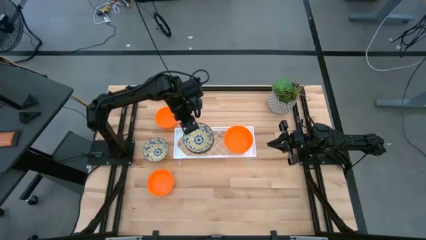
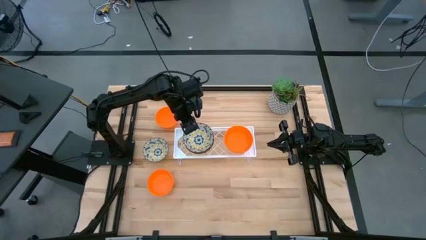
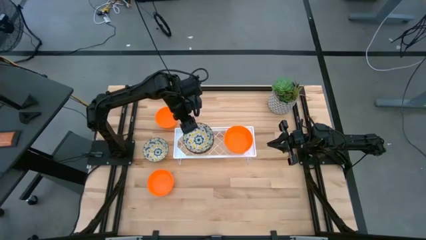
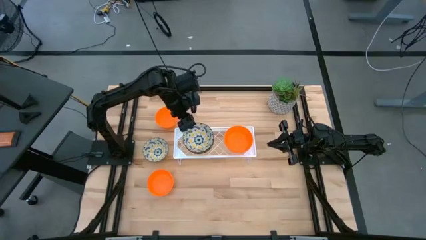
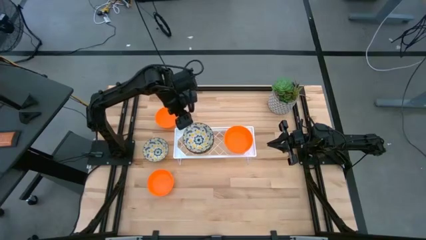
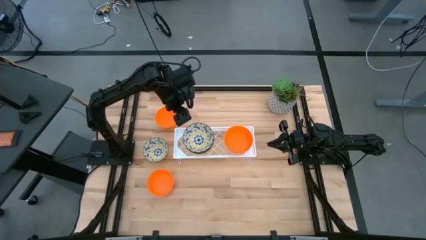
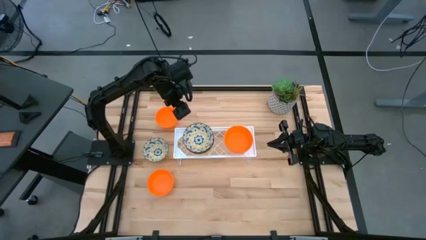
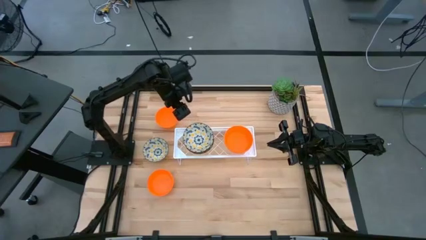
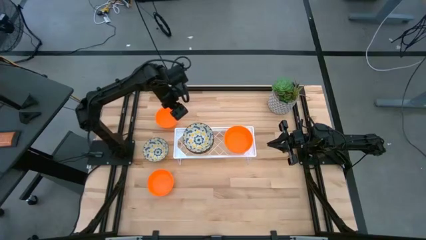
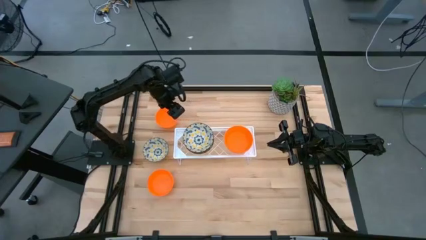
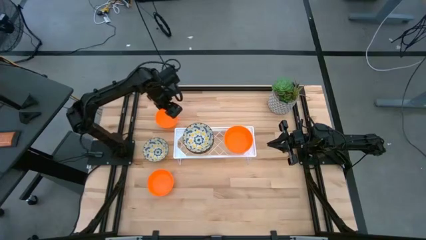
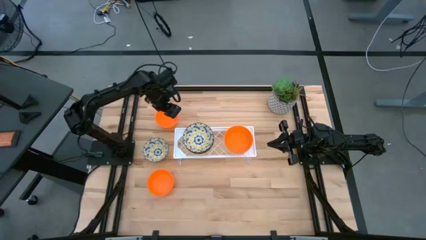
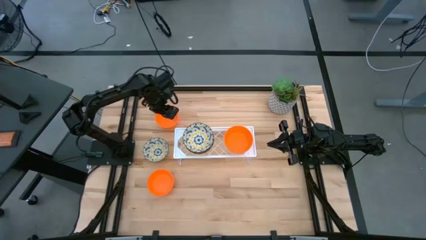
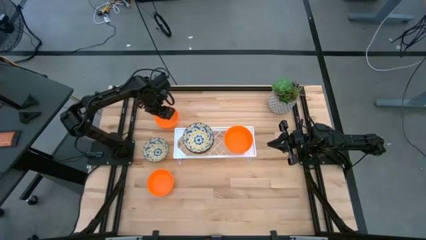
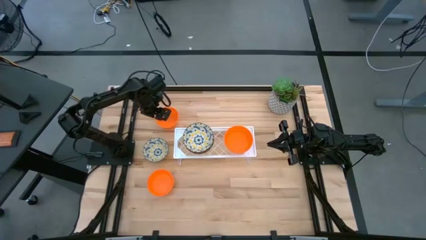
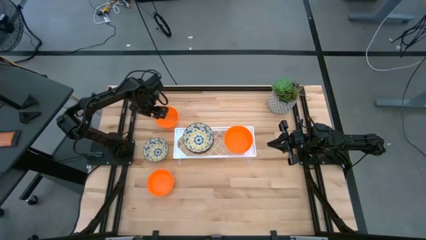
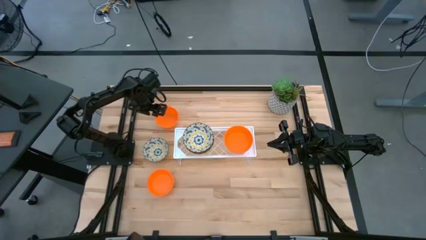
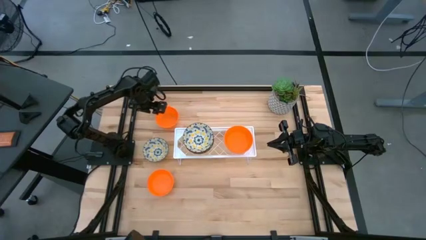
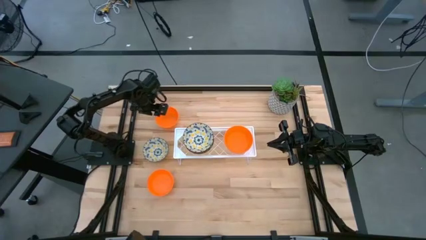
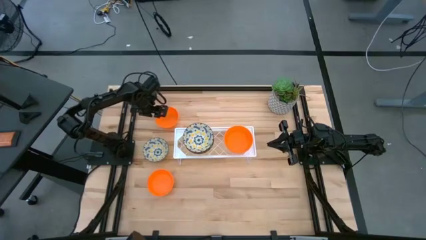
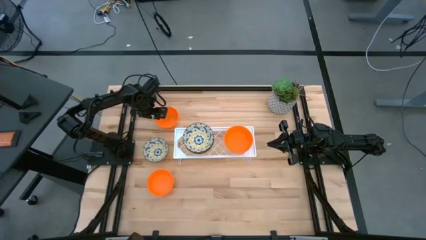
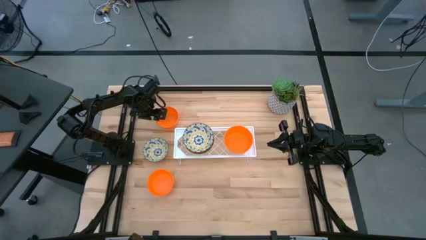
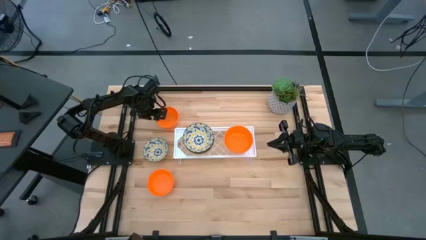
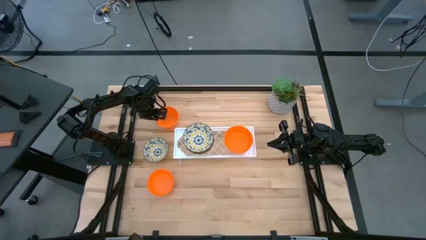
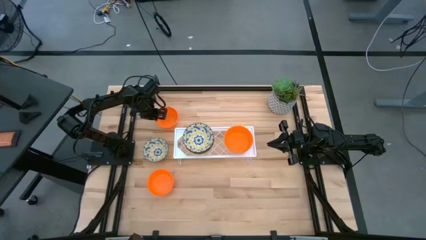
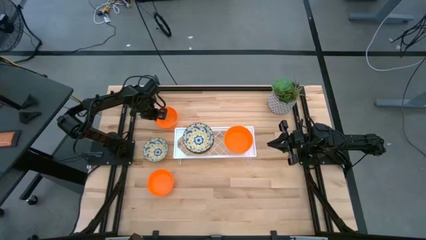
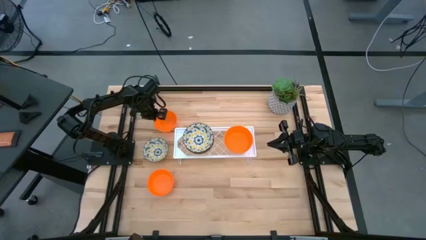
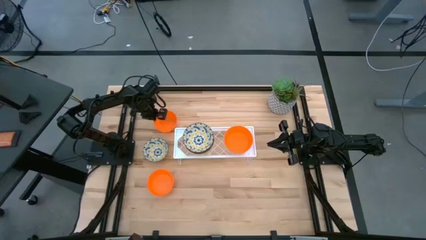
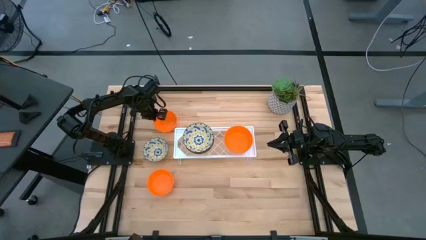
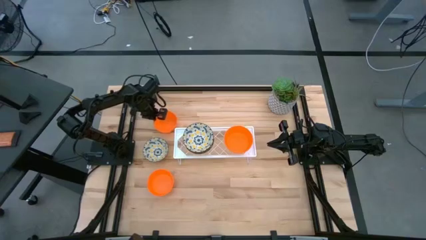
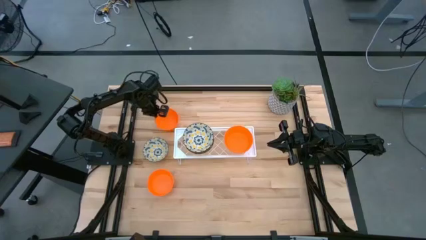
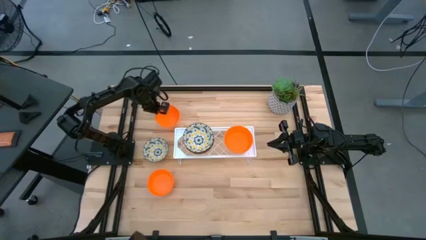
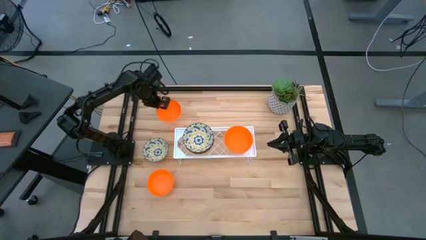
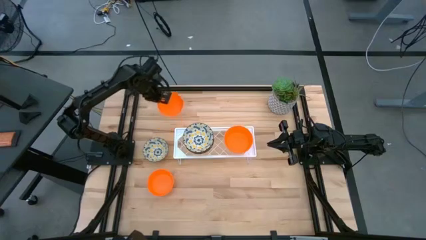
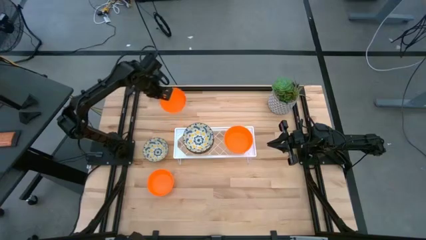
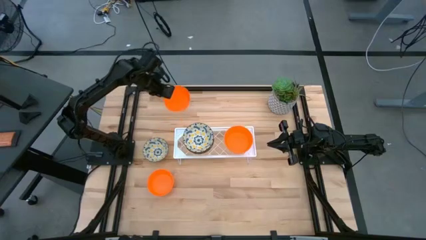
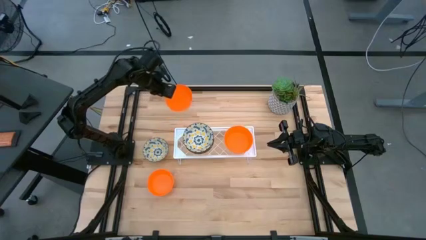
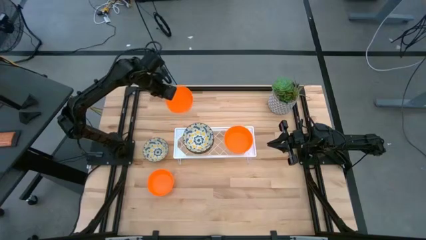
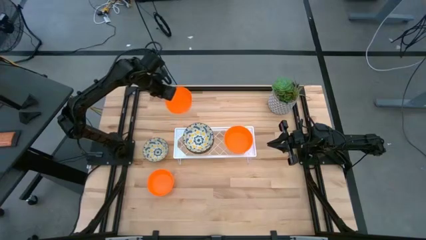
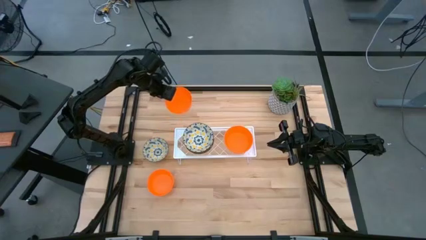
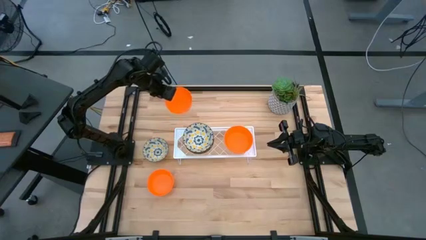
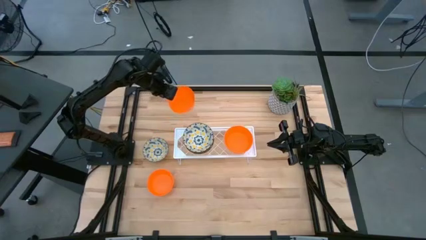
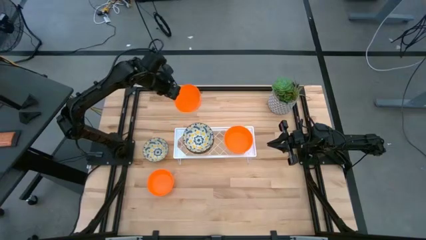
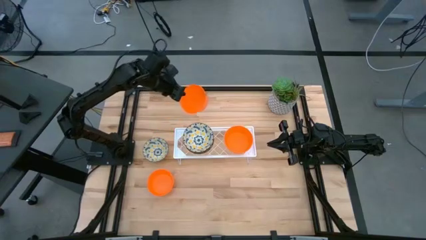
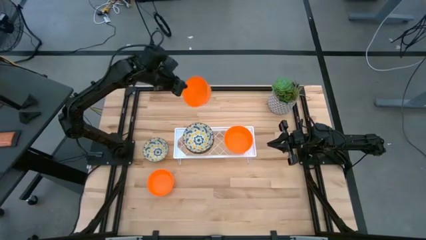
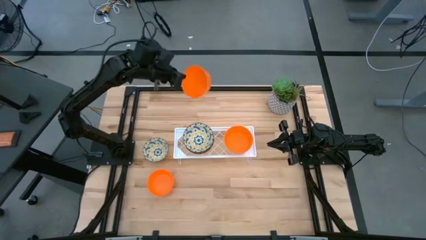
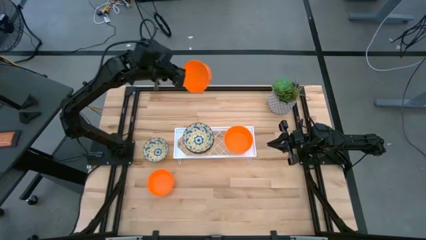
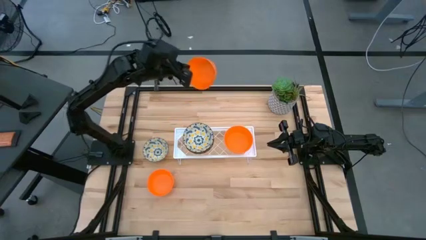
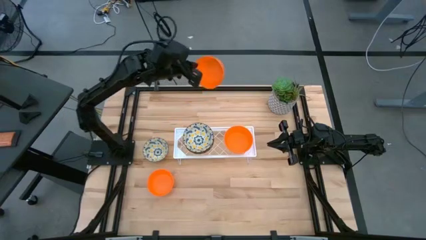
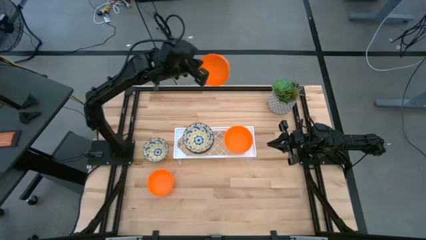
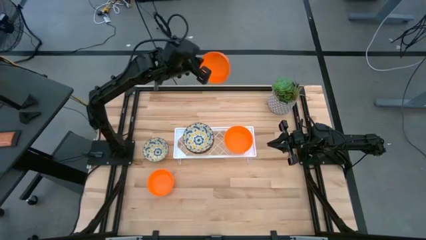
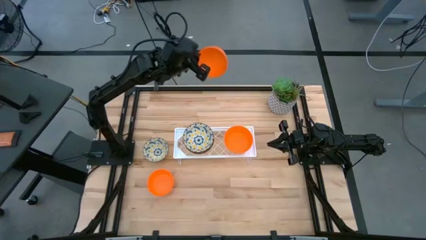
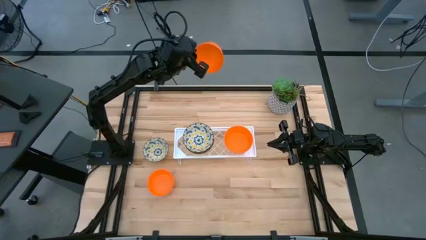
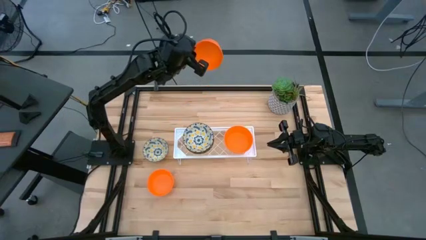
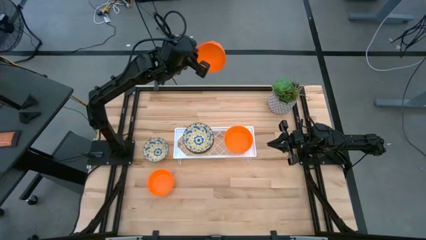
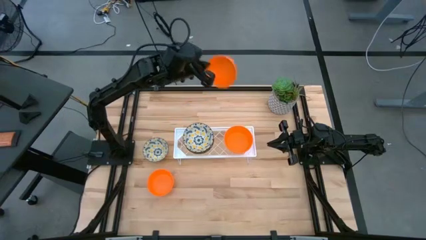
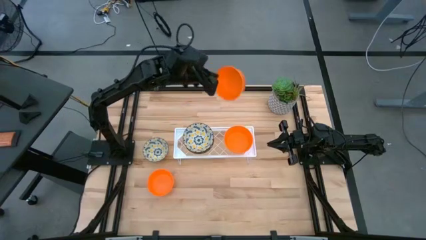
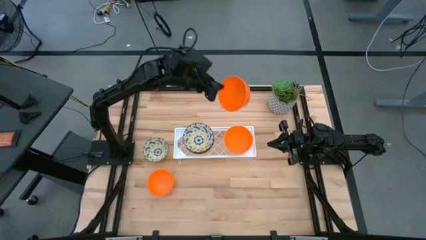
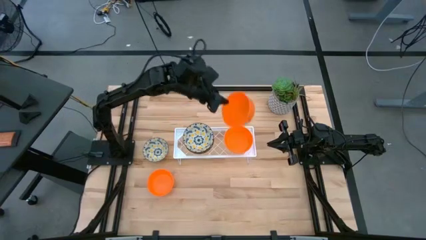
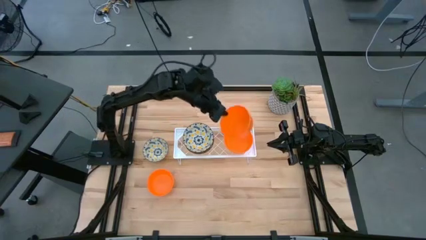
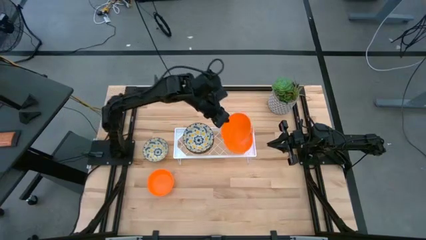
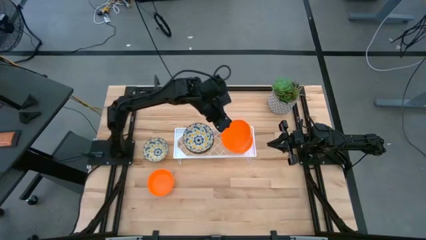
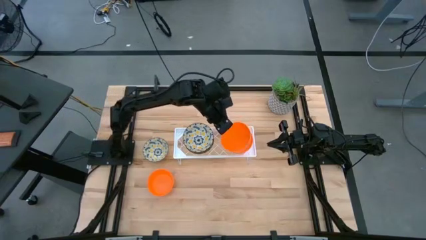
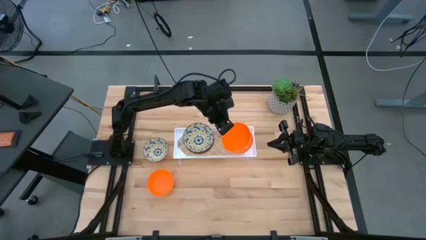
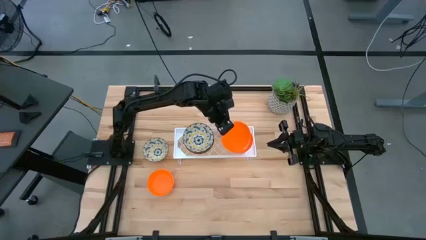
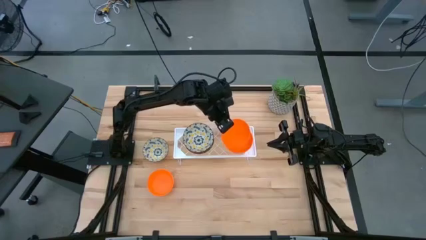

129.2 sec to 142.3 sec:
Task: Pick & Place Mini bowls
Stack the orange bowl on the orange bowl on the shelf
